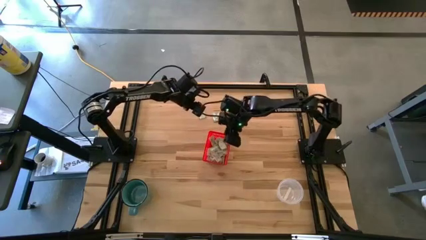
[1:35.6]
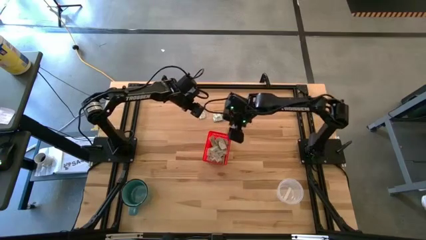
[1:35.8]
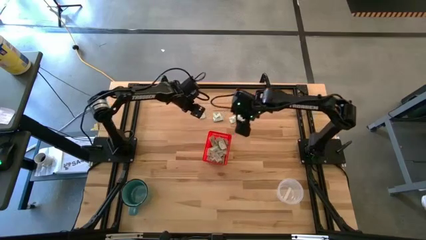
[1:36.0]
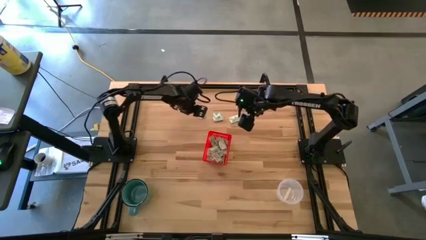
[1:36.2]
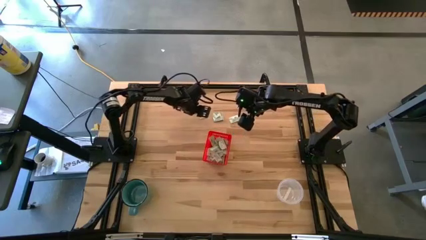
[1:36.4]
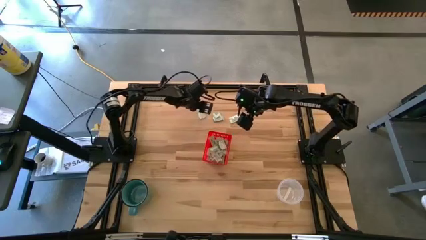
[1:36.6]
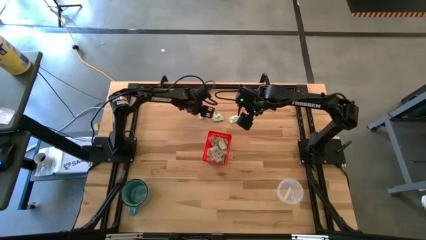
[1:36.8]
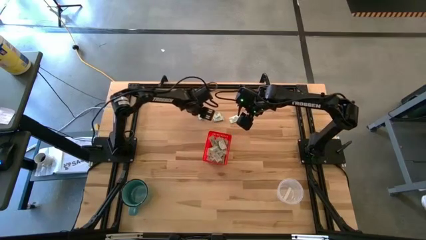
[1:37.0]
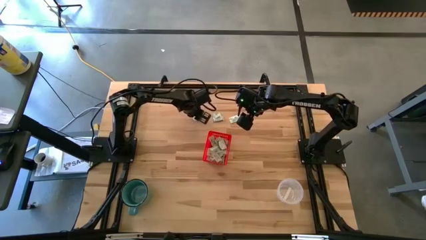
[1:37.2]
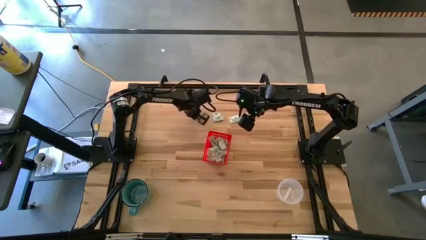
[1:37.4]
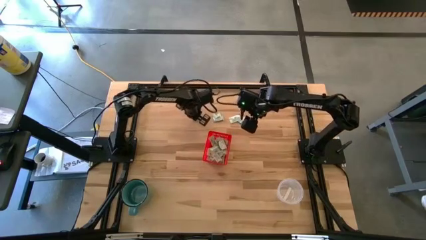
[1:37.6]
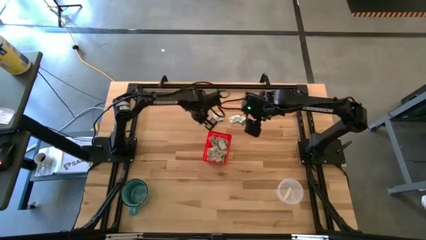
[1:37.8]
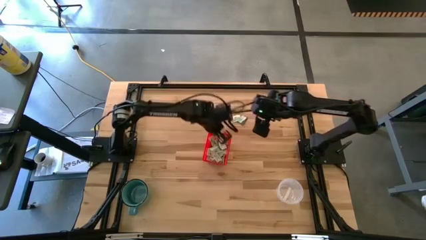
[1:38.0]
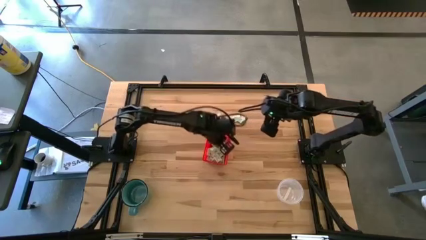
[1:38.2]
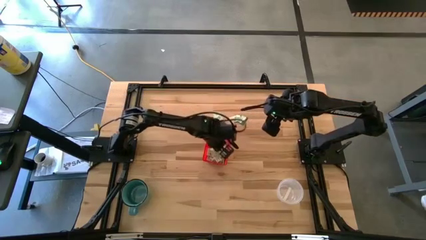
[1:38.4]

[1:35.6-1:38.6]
Task: Pick and place items into bin
Put the left white stevia packet into the bin

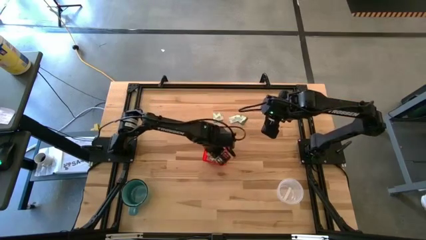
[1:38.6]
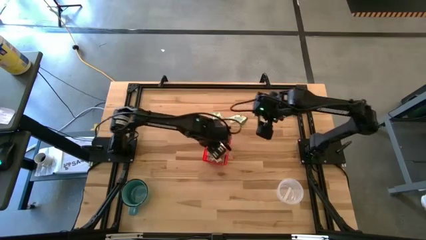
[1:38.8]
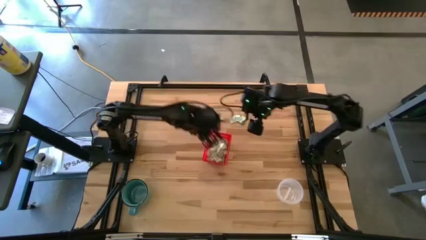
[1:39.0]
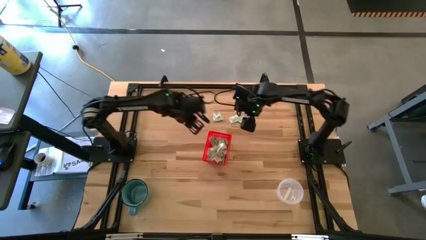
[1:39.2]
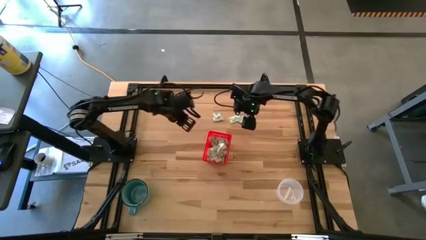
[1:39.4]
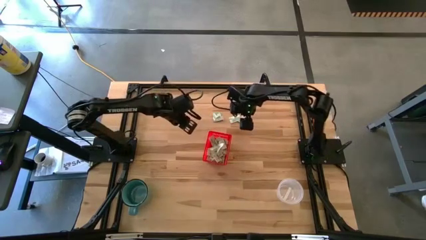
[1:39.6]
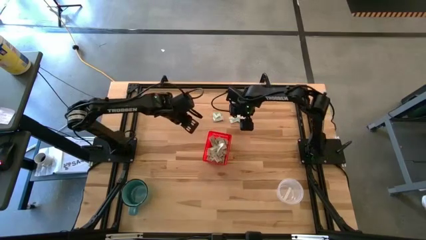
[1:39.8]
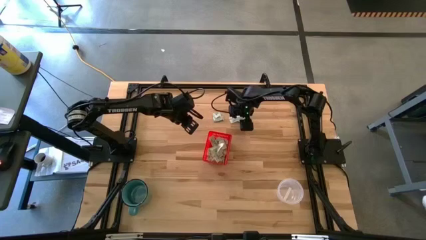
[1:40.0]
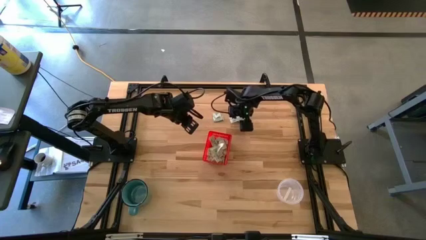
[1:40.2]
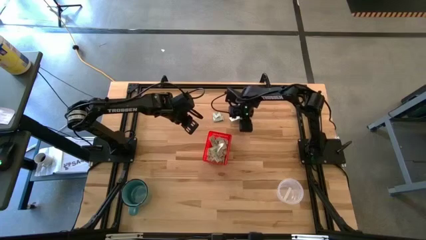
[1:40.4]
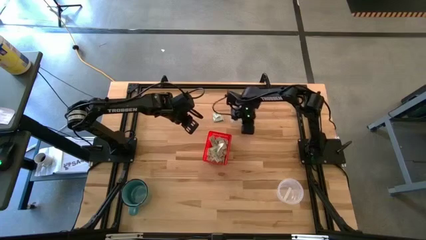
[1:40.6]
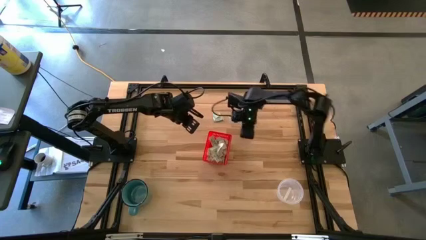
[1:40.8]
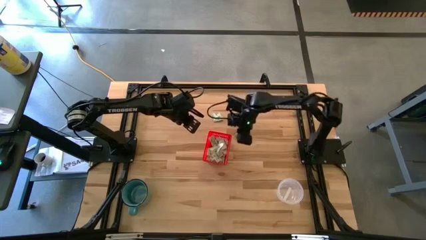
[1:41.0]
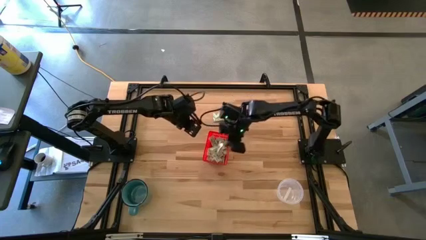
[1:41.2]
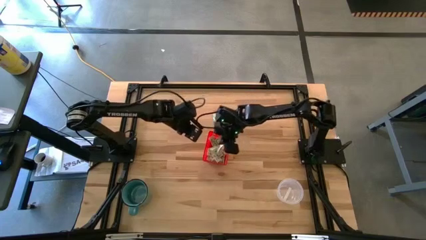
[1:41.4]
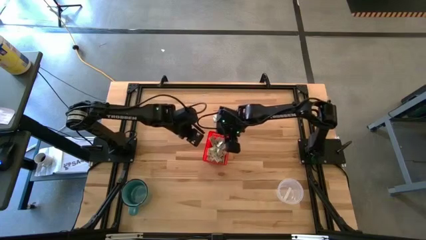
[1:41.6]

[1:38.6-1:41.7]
Put the right green stevia packet into the bin

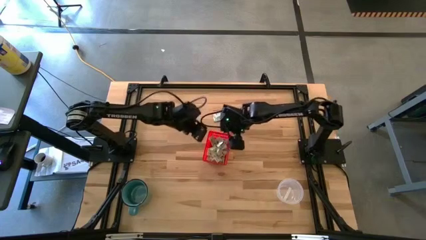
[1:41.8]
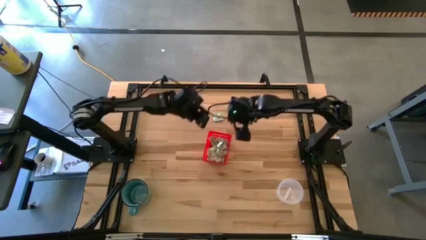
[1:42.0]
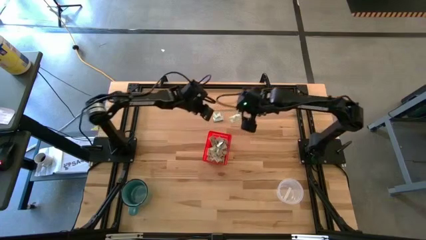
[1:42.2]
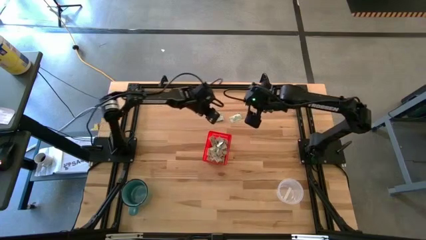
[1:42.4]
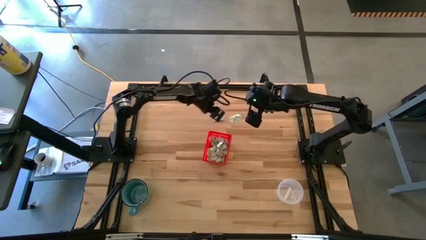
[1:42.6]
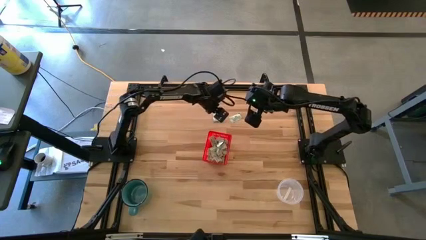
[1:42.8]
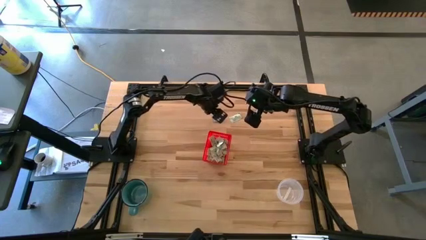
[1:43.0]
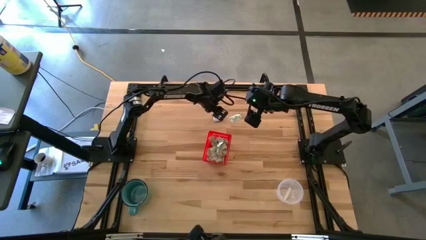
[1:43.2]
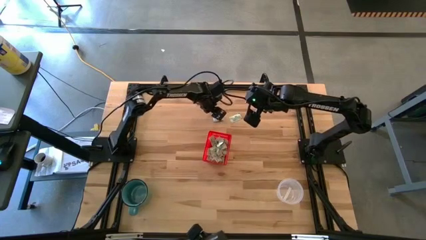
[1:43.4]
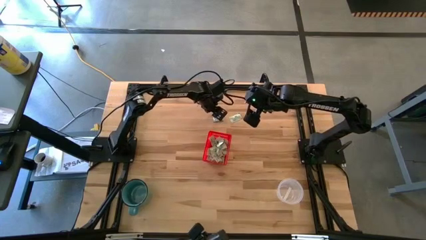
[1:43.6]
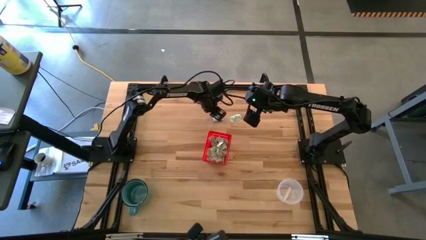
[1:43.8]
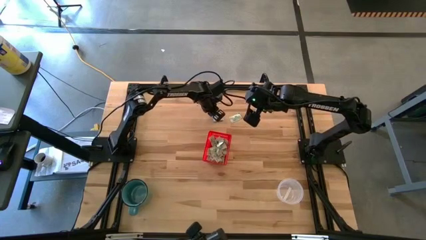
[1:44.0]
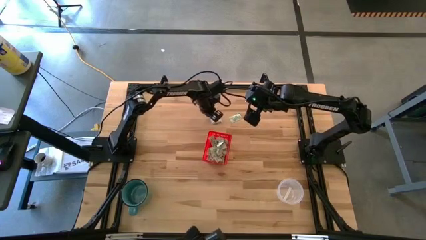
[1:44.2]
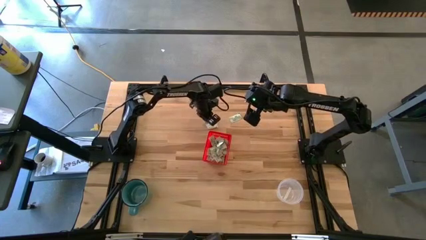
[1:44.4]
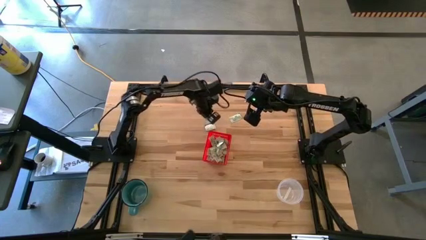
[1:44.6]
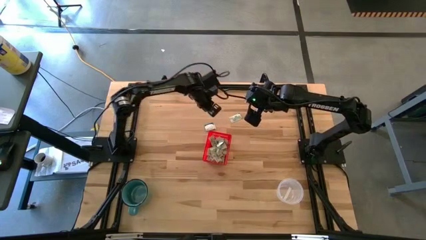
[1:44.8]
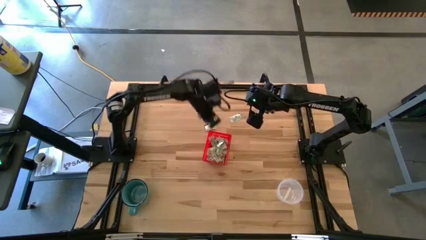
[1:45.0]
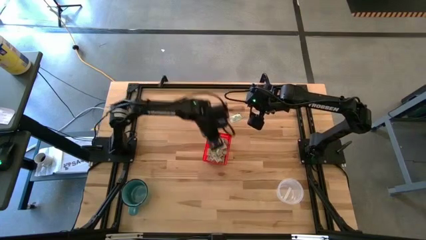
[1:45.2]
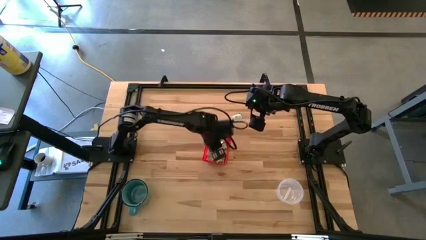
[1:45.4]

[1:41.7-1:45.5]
Put the left white stevia packet into the bin

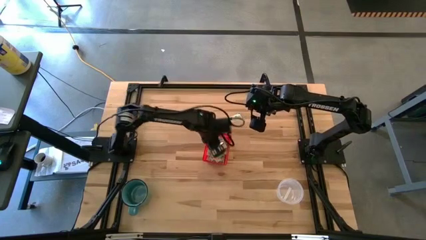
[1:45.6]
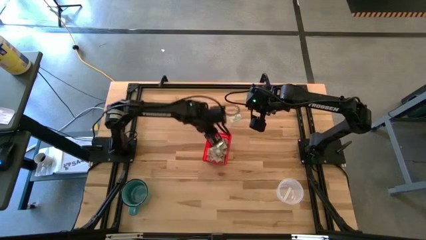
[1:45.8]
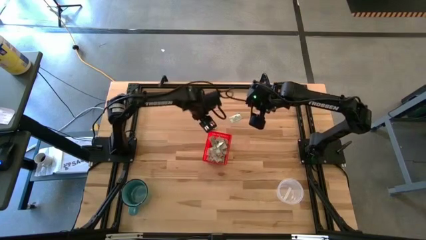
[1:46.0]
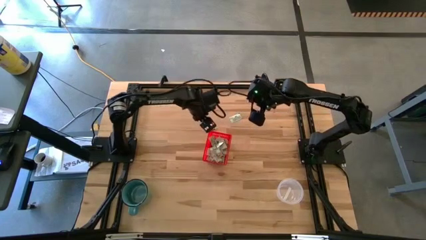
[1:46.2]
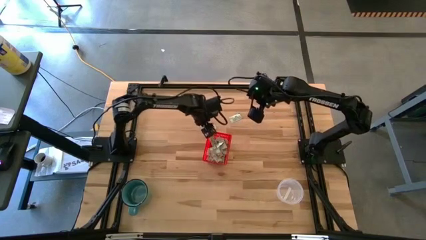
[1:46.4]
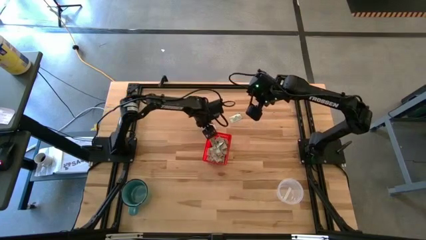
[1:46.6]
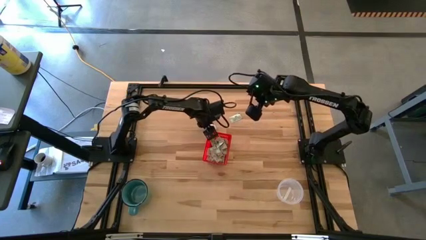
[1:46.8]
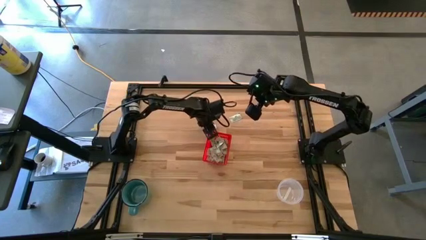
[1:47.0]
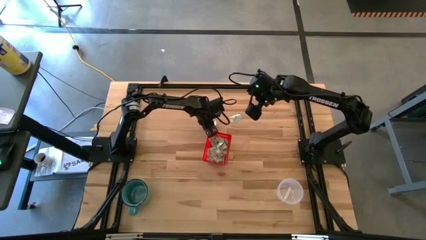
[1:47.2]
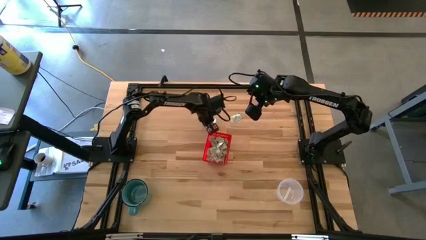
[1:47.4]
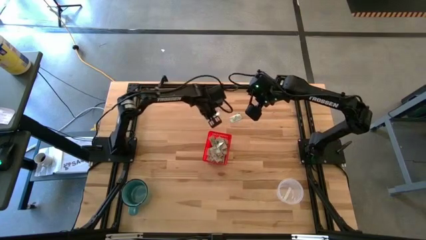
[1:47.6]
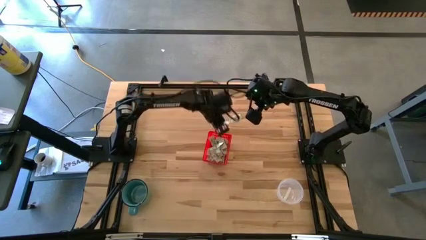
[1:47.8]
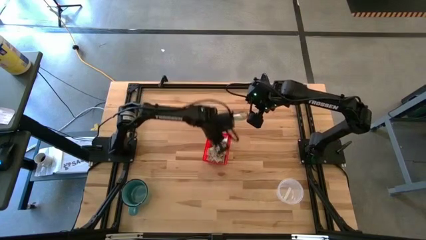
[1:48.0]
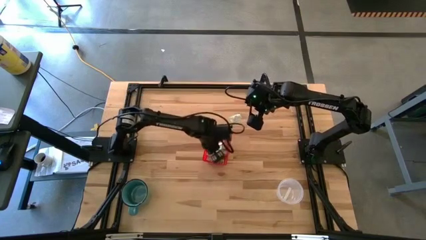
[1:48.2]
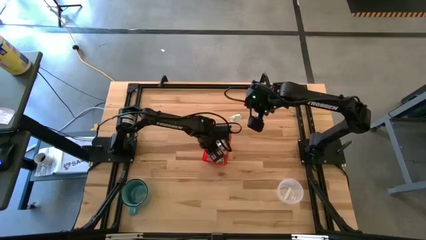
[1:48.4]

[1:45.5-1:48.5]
Put the green stevia packet into the bin

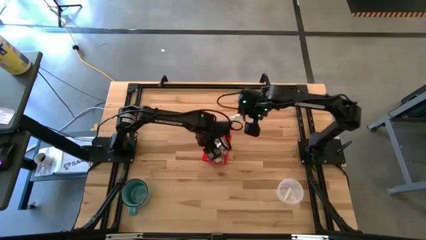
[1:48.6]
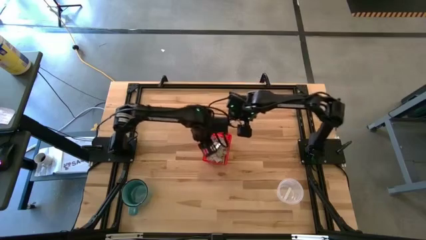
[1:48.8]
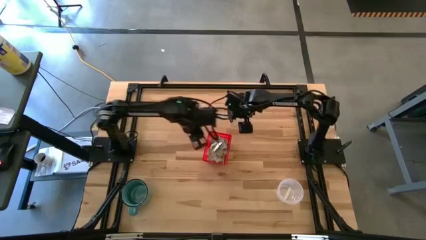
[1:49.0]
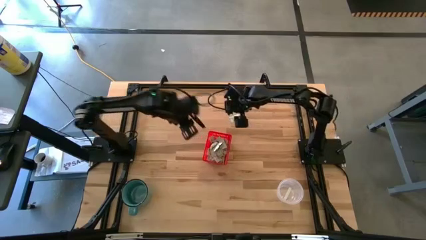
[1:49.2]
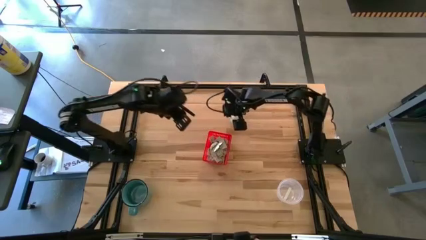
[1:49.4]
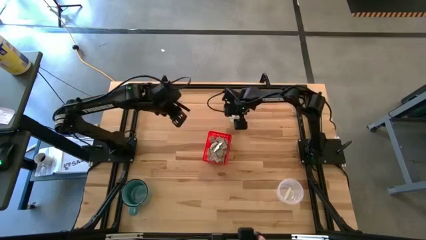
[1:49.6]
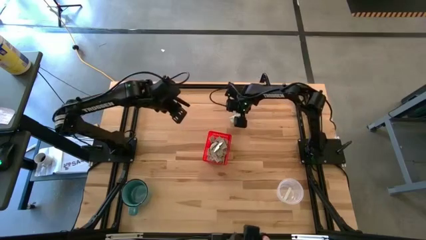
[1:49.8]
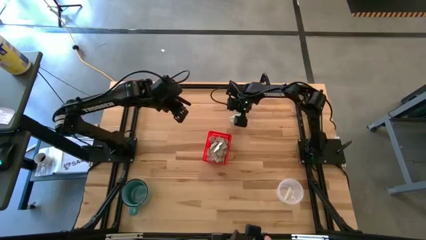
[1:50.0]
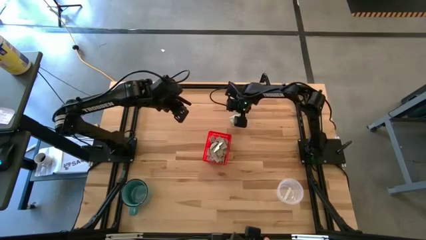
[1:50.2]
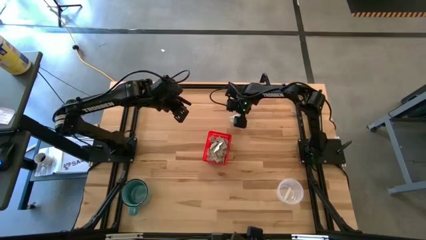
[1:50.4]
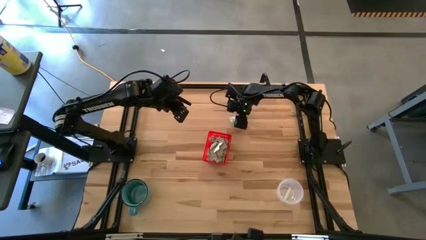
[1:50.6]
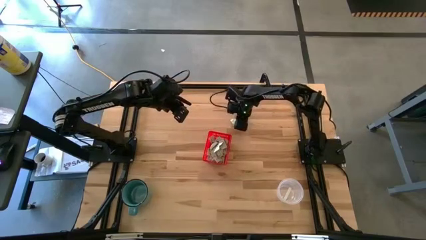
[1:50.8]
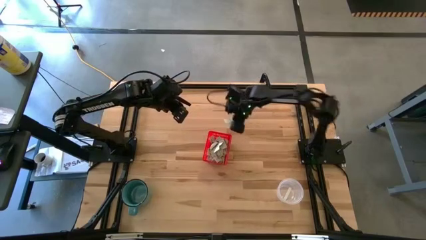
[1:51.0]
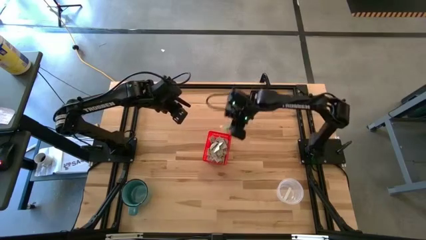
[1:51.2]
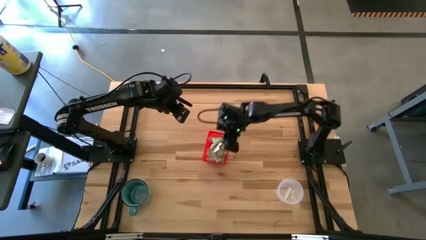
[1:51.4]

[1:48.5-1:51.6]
Put the white stevia packet into the bin

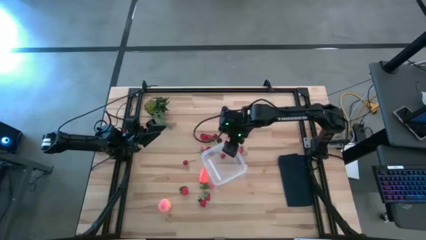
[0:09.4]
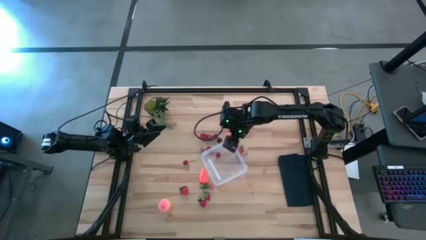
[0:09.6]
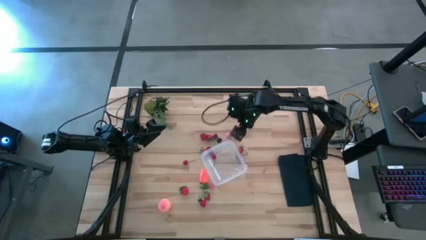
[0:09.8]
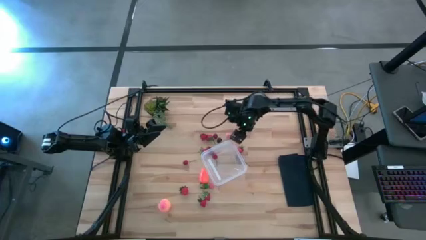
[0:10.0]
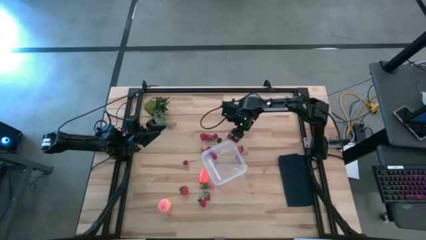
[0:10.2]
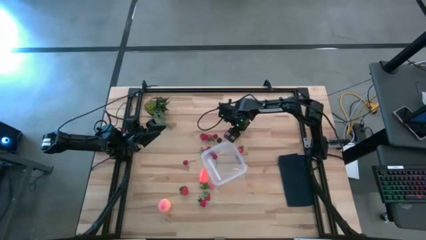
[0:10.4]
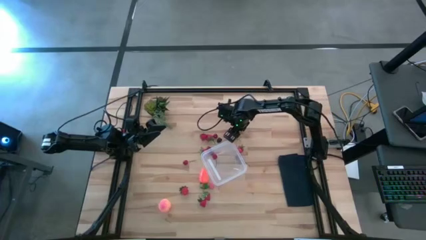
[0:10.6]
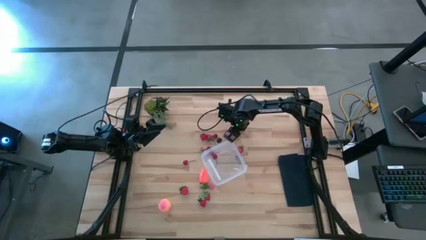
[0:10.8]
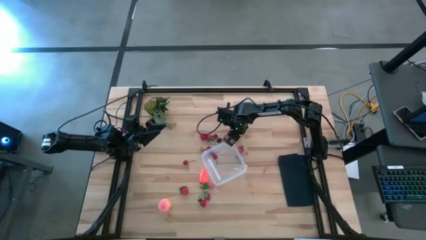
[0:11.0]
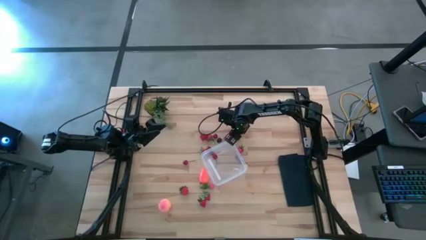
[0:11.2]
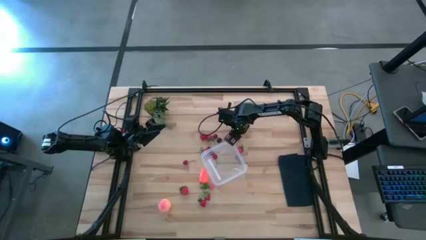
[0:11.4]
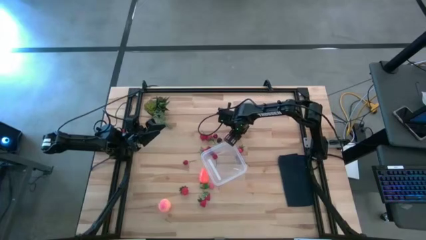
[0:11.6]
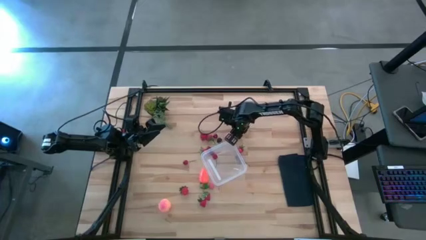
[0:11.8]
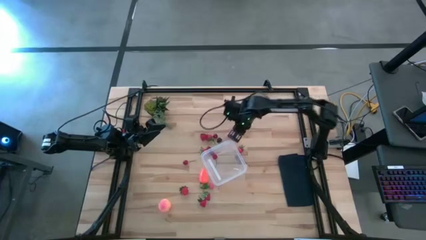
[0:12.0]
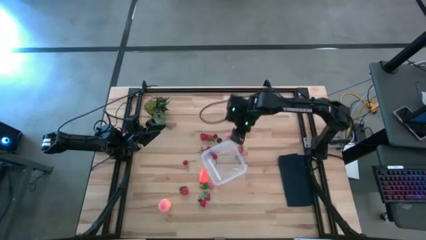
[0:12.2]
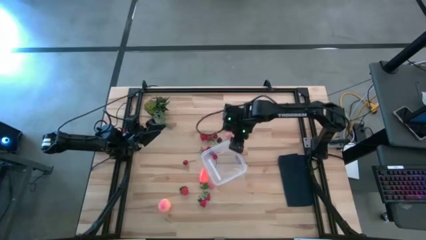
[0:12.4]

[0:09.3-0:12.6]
Task: Pick and placing Produce into tupperware
Put the cherry into the transparent container
